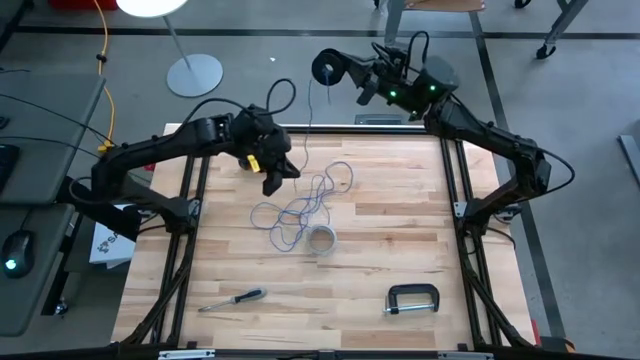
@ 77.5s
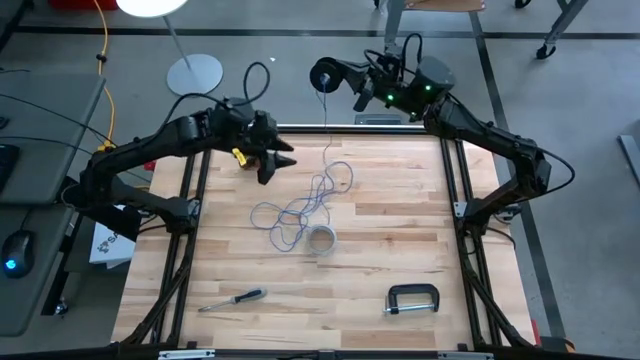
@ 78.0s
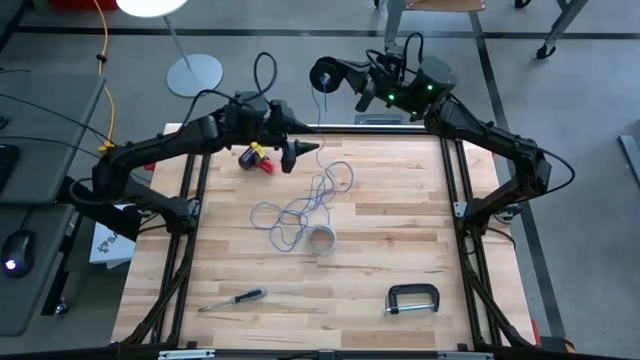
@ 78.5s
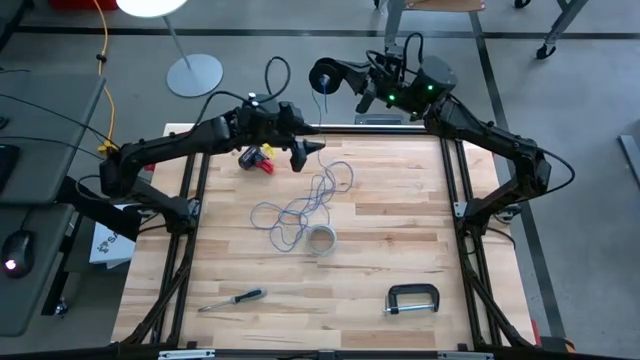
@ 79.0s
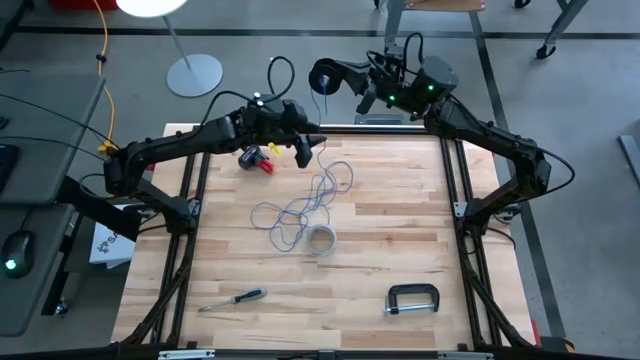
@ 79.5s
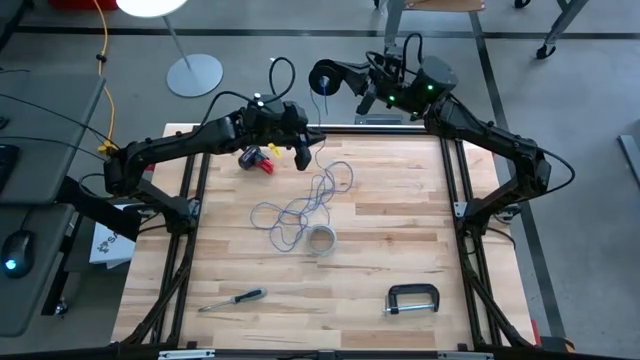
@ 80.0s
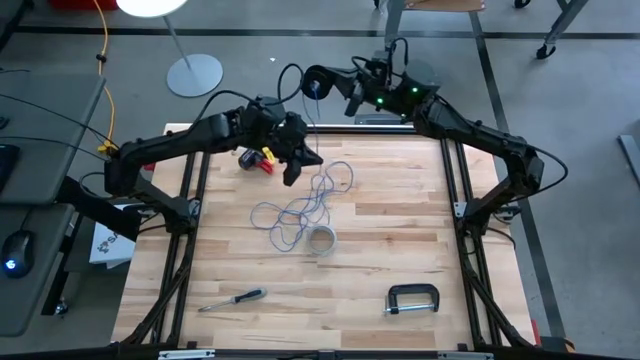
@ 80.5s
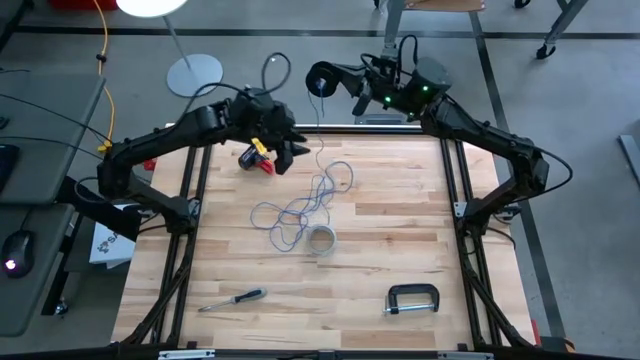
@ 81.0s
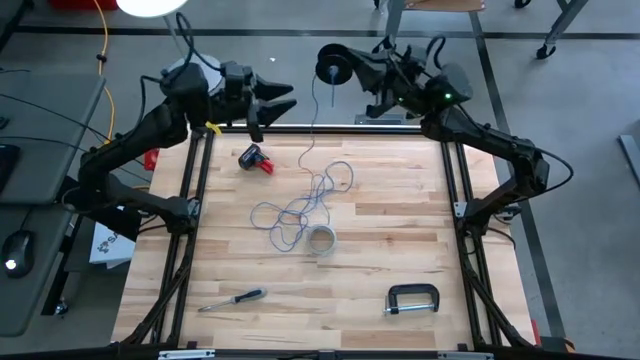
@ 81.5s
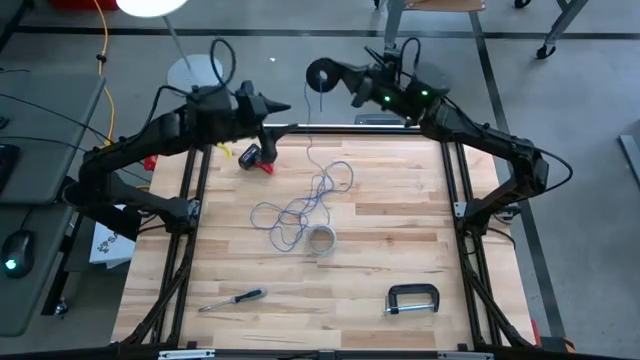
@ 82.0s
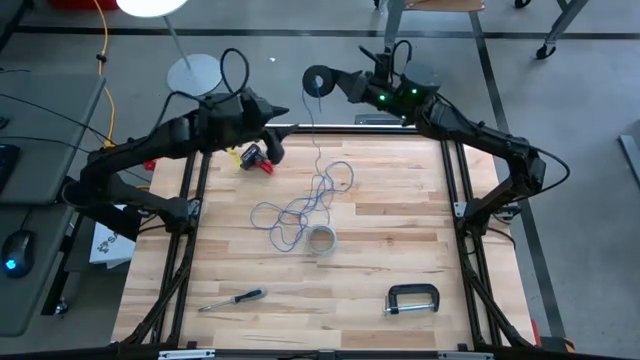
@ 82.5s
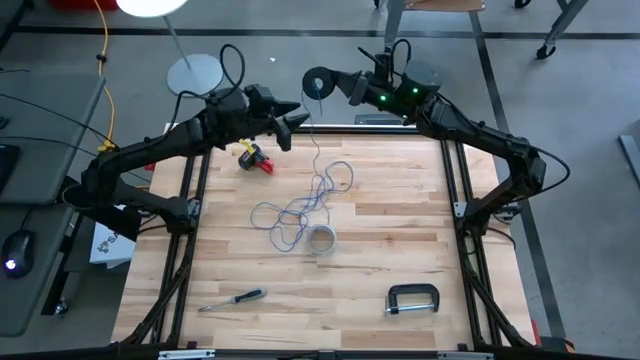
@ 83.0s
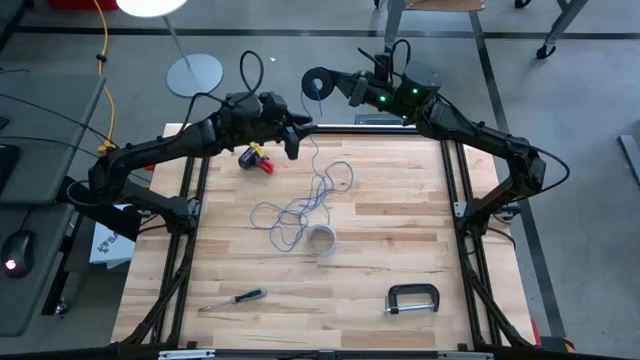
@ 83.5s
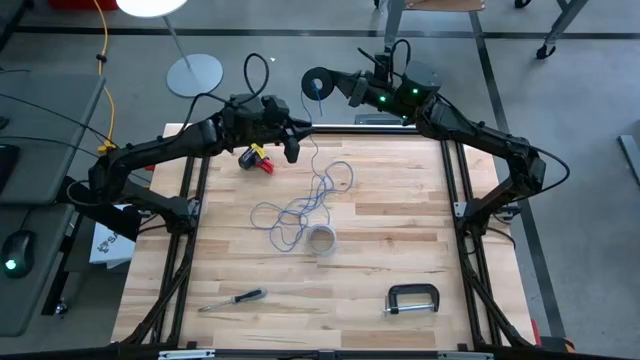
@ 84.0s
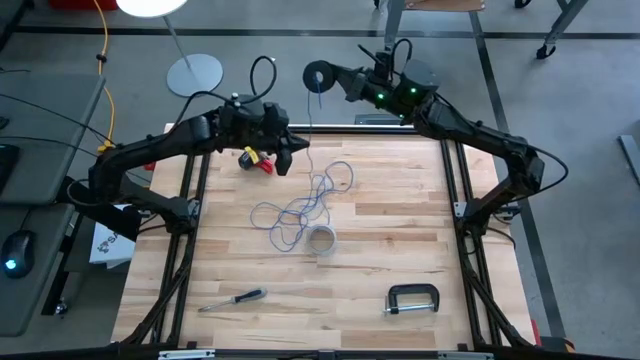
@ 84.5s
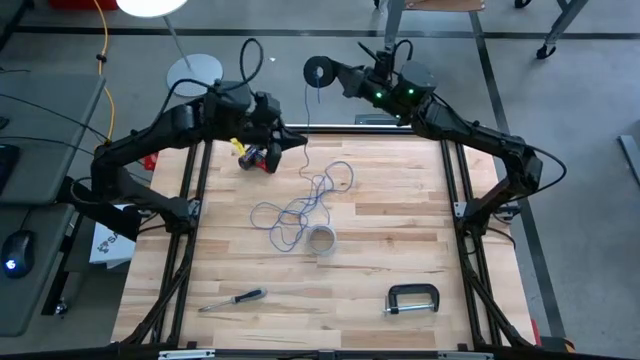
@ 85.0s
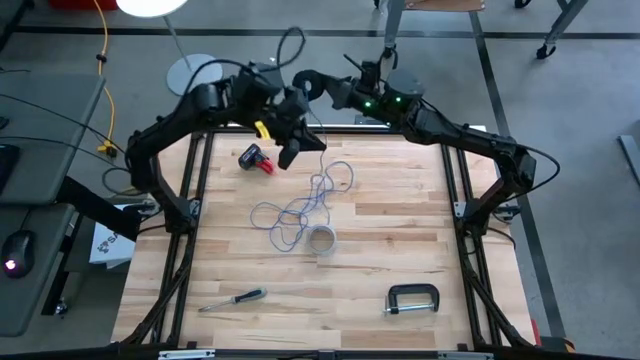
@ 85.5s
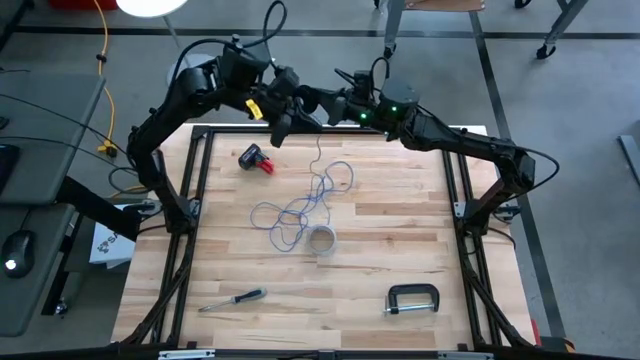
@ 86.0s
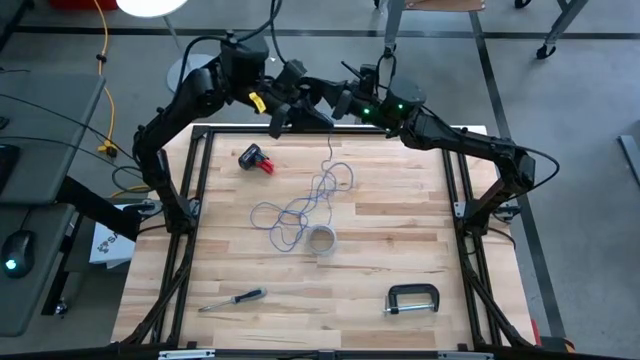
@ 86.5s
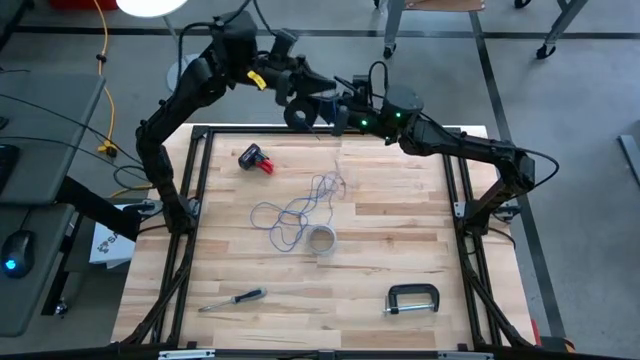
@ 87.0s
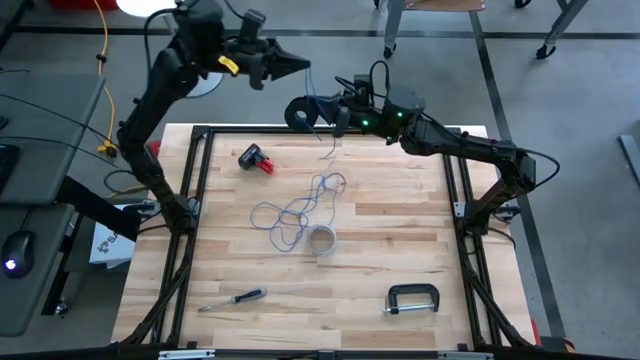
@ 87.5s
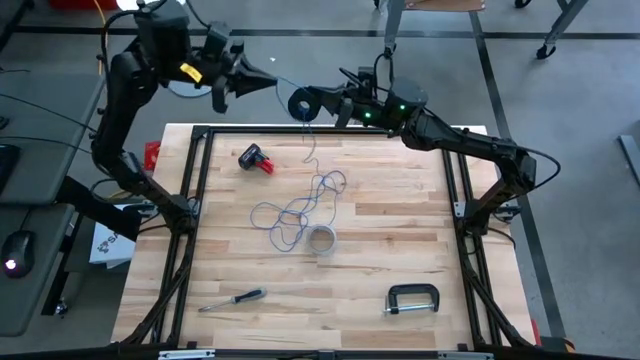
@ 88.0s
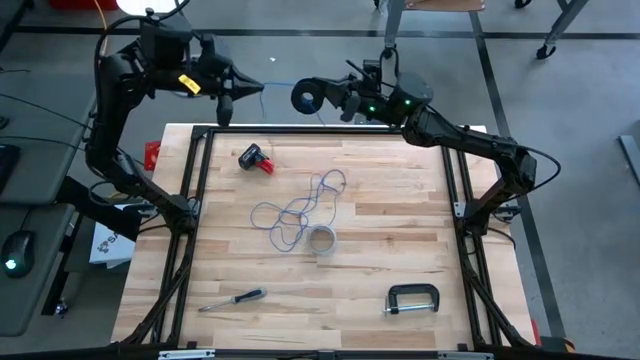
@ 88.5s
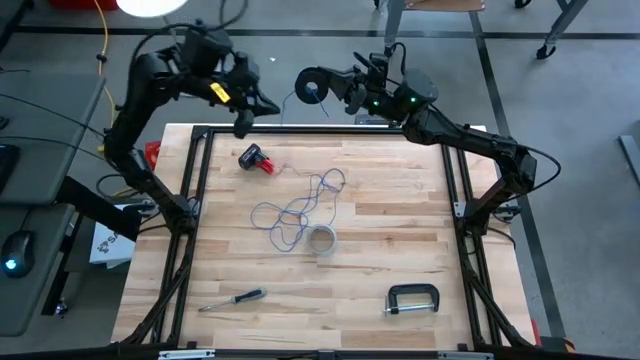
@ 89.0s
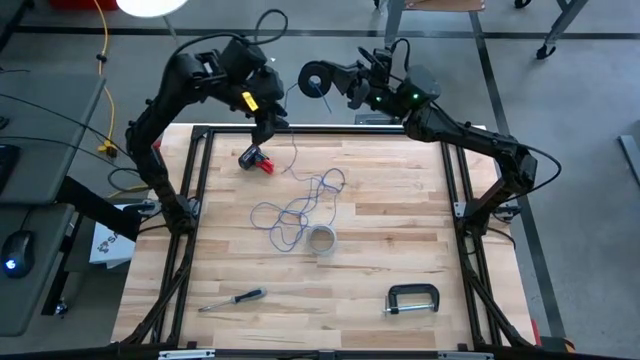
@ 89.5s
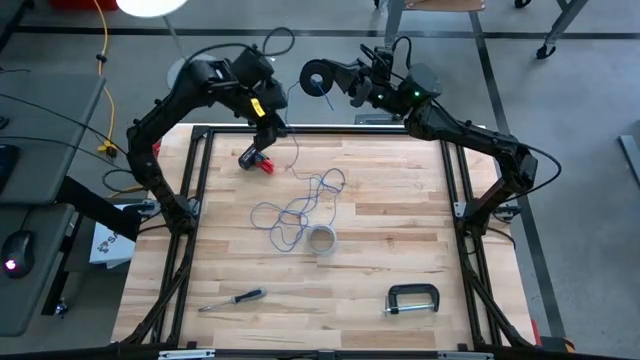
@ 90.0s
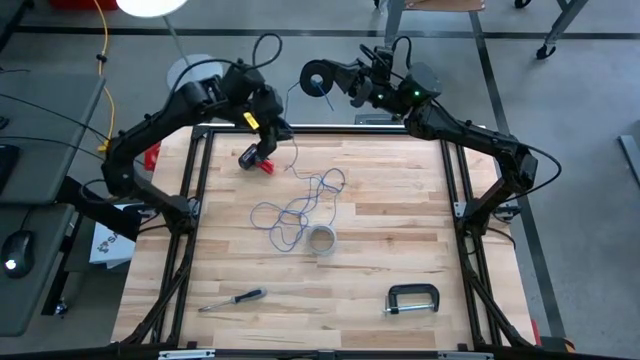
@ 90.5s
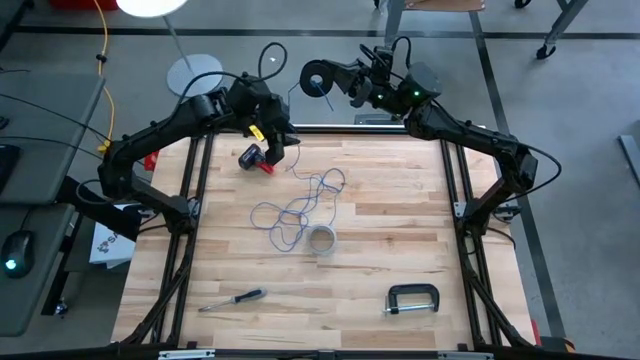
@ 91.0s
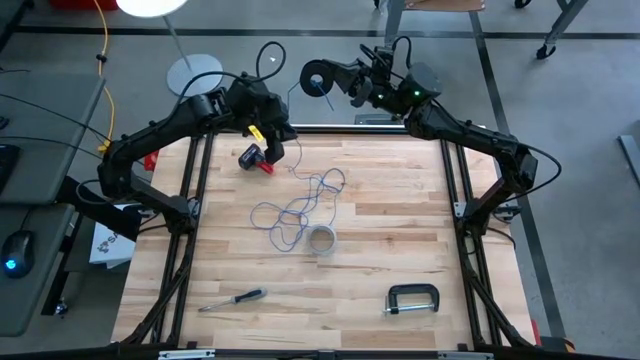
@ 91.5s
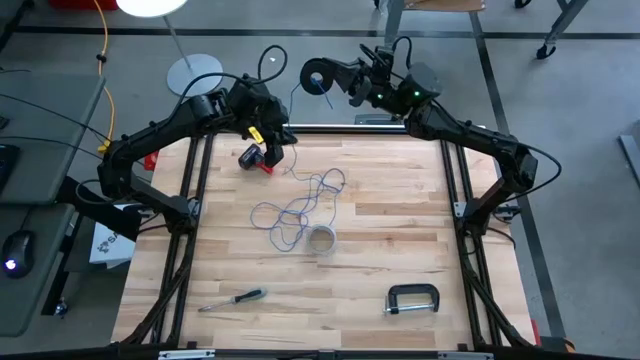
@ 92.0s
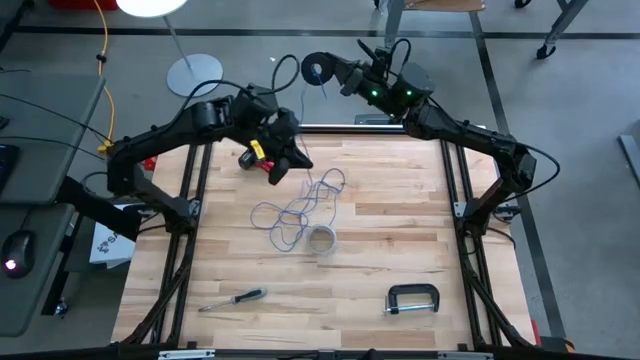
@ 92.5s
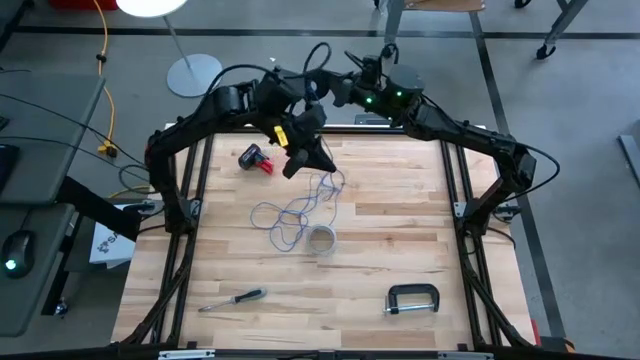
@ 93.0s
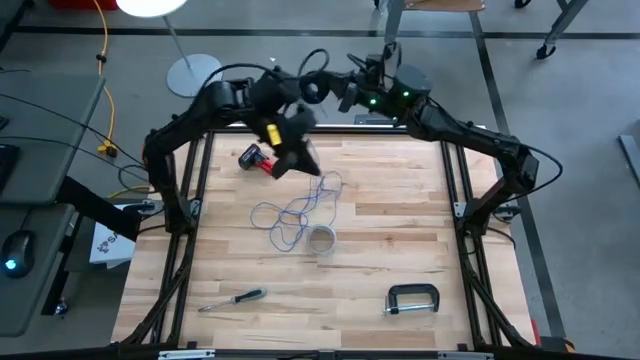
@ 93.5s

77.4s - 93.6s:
Task: Coil cords
Coil the blue wire on the spool
